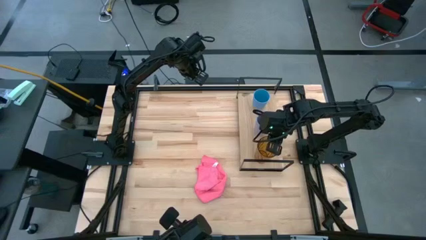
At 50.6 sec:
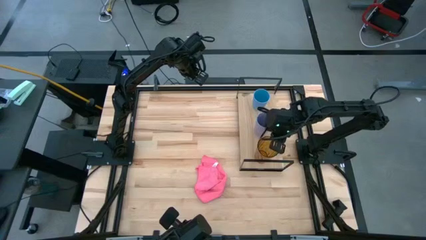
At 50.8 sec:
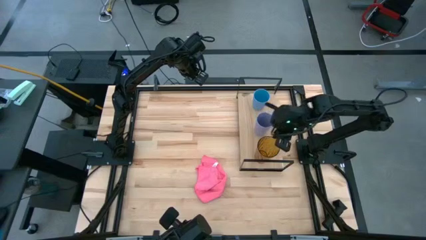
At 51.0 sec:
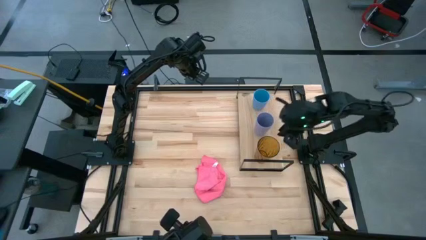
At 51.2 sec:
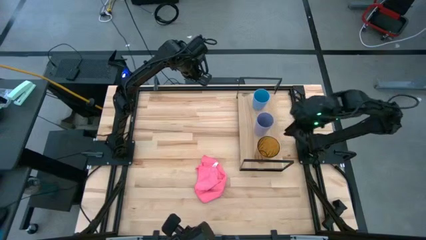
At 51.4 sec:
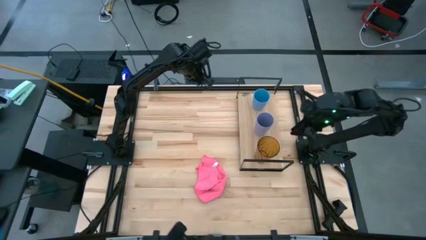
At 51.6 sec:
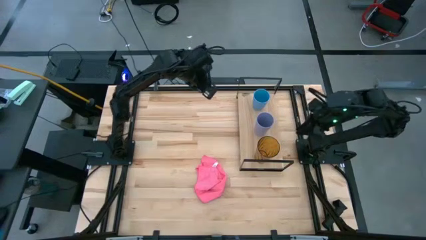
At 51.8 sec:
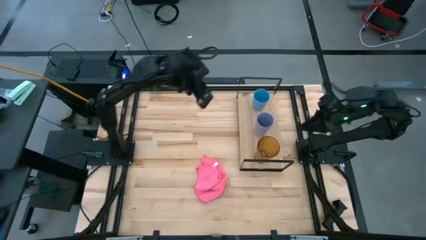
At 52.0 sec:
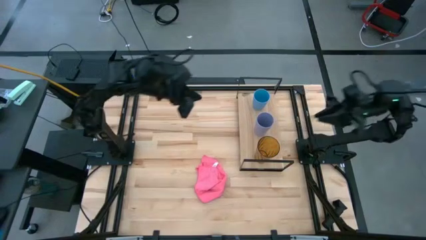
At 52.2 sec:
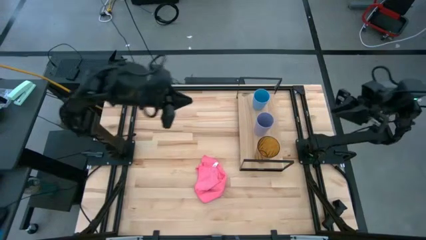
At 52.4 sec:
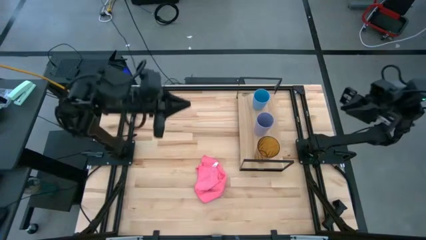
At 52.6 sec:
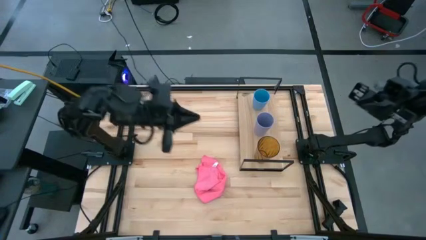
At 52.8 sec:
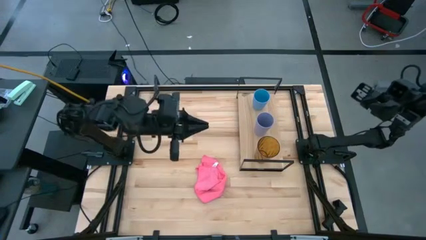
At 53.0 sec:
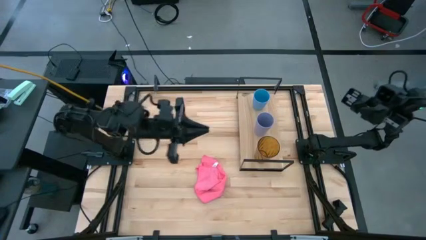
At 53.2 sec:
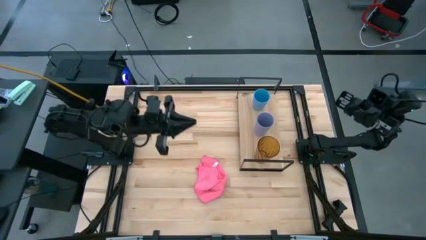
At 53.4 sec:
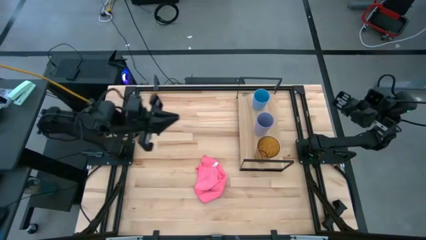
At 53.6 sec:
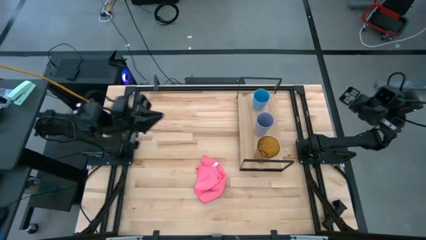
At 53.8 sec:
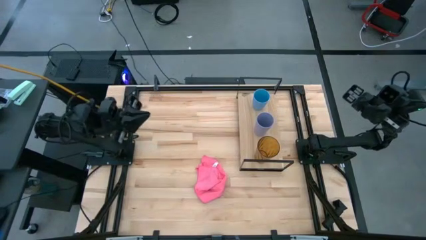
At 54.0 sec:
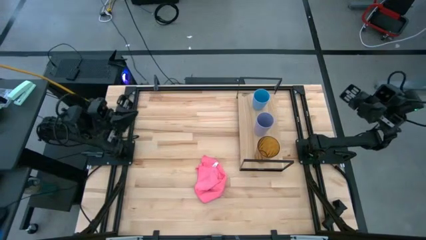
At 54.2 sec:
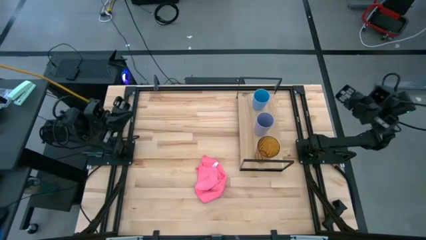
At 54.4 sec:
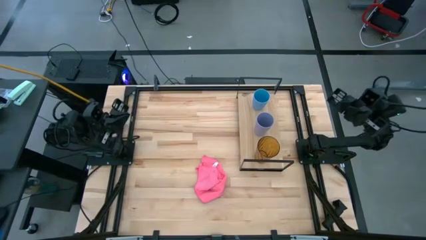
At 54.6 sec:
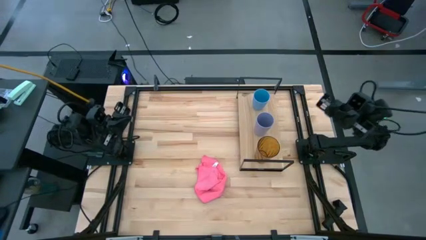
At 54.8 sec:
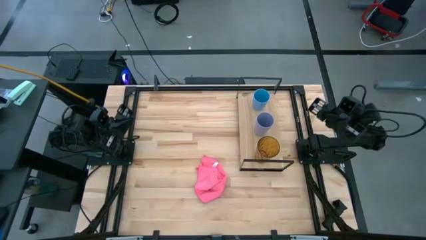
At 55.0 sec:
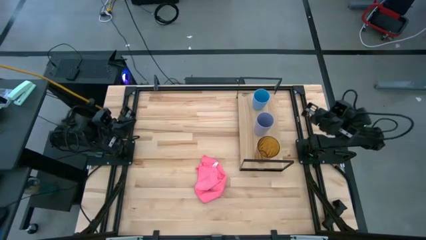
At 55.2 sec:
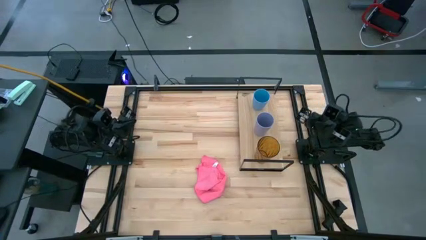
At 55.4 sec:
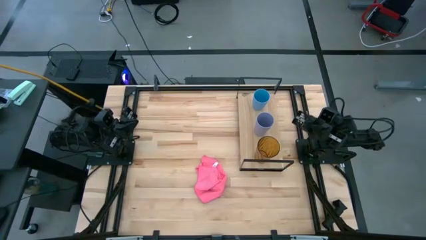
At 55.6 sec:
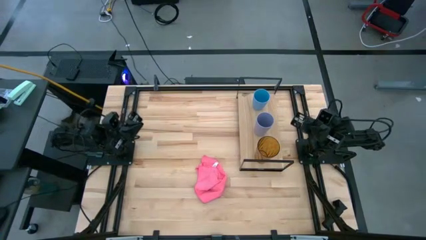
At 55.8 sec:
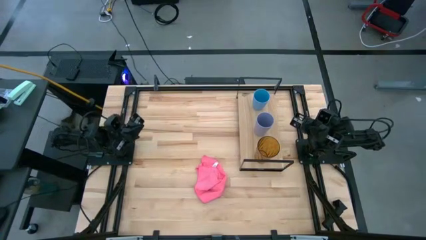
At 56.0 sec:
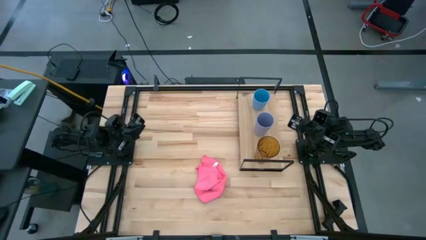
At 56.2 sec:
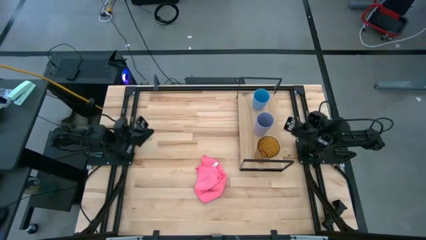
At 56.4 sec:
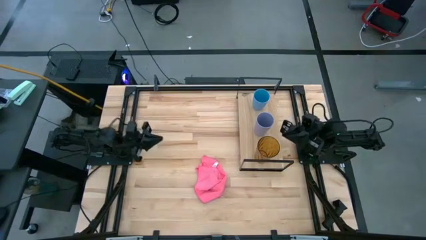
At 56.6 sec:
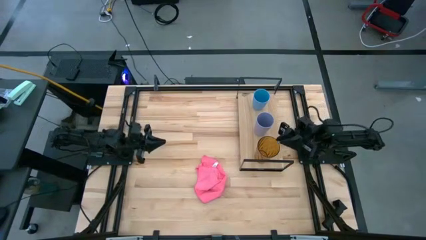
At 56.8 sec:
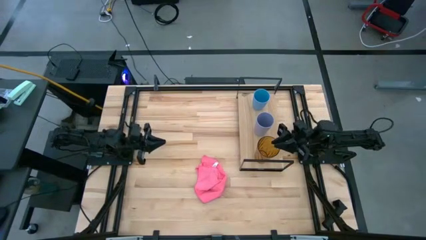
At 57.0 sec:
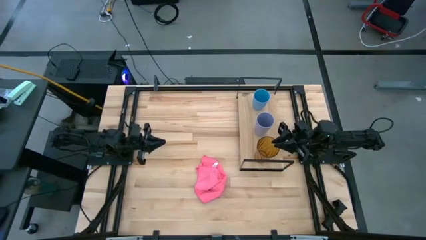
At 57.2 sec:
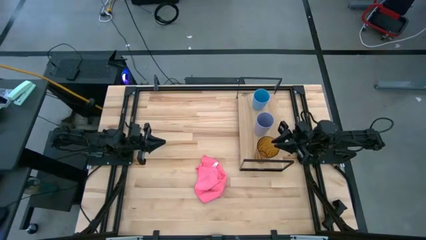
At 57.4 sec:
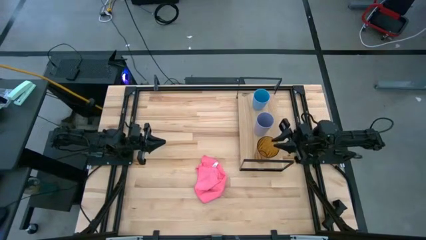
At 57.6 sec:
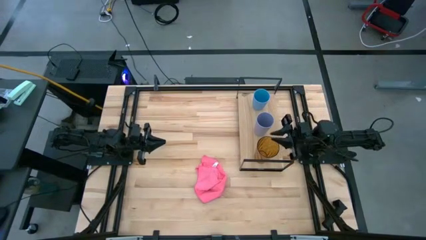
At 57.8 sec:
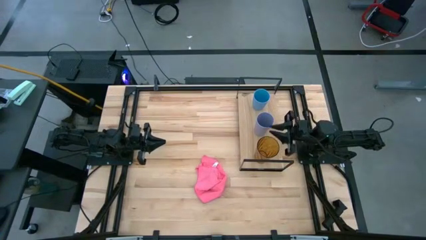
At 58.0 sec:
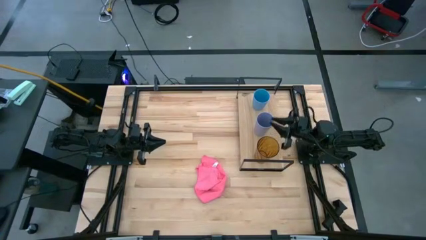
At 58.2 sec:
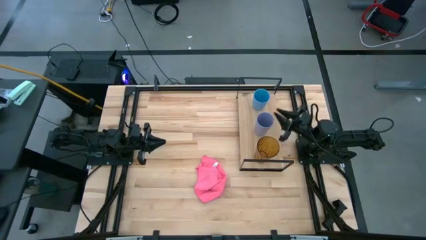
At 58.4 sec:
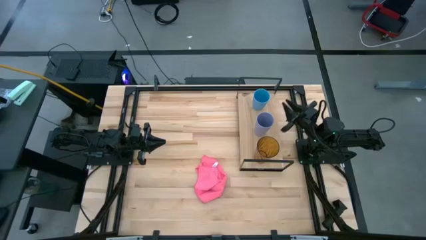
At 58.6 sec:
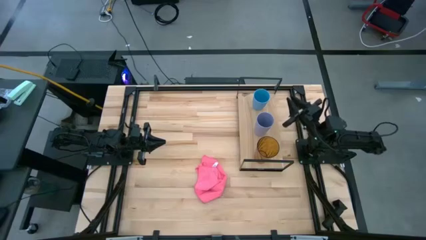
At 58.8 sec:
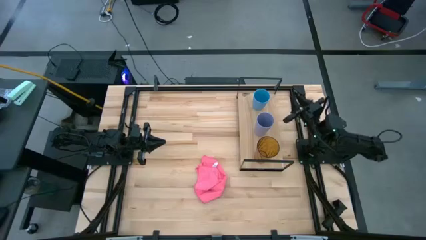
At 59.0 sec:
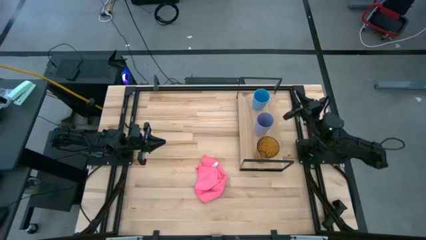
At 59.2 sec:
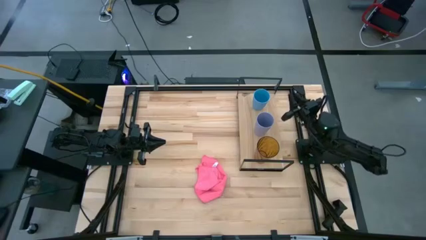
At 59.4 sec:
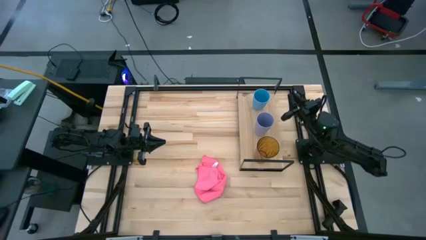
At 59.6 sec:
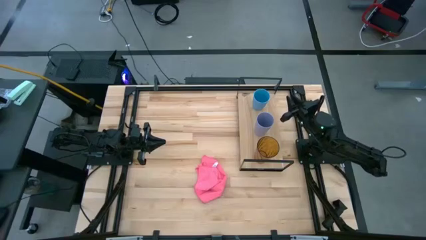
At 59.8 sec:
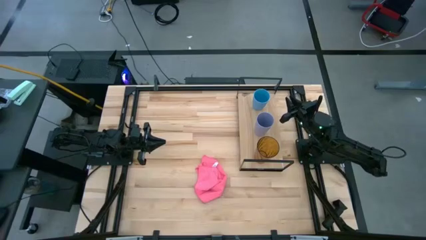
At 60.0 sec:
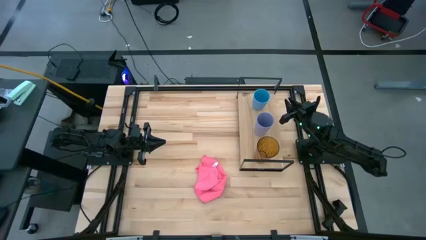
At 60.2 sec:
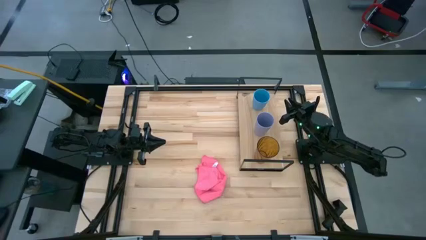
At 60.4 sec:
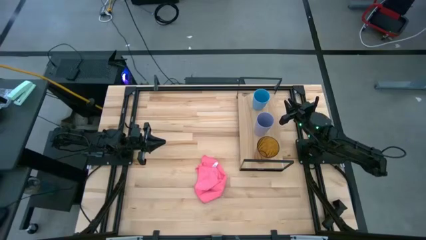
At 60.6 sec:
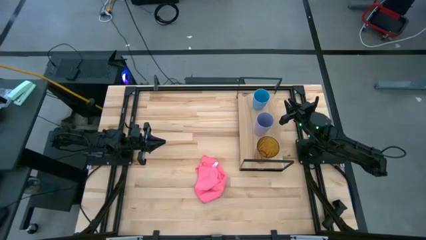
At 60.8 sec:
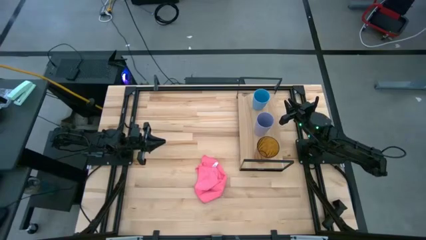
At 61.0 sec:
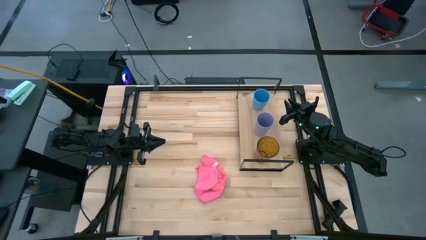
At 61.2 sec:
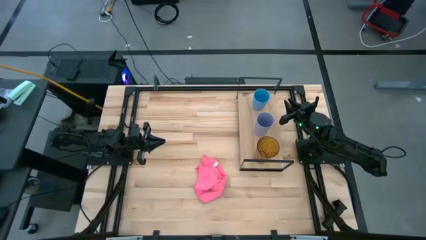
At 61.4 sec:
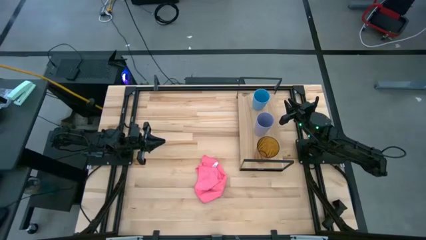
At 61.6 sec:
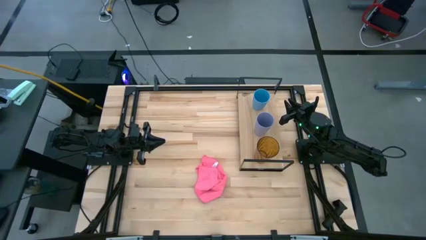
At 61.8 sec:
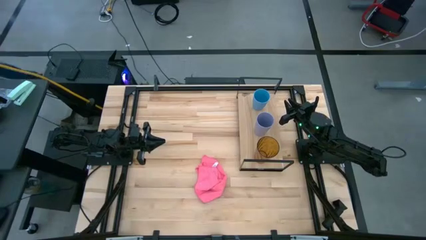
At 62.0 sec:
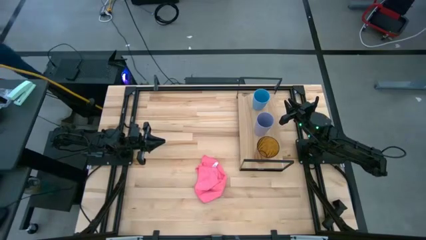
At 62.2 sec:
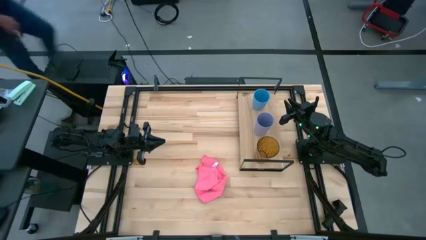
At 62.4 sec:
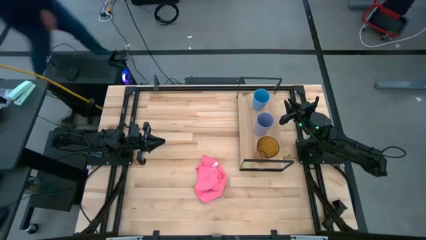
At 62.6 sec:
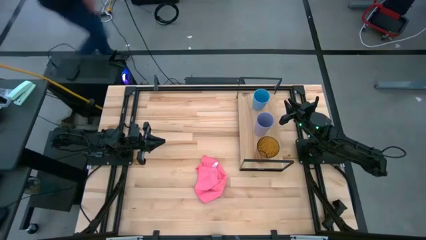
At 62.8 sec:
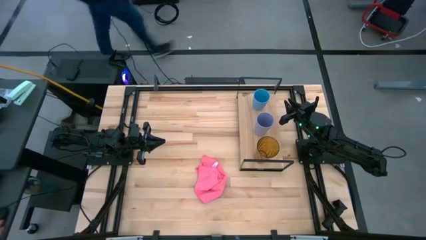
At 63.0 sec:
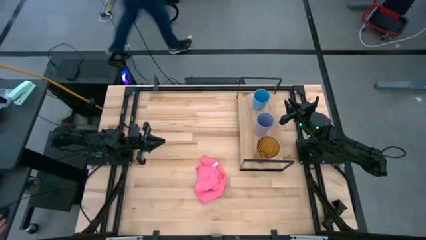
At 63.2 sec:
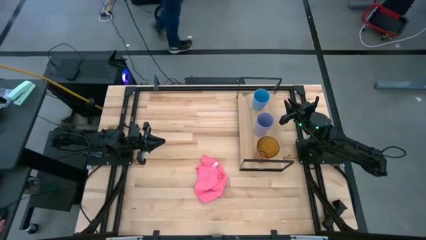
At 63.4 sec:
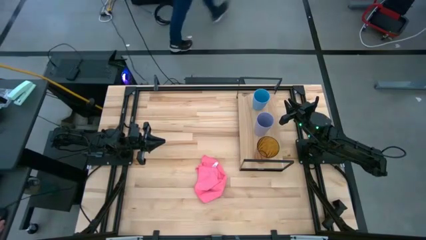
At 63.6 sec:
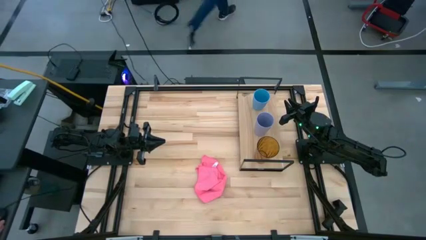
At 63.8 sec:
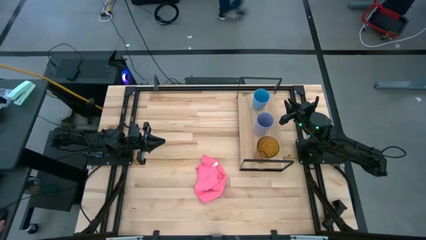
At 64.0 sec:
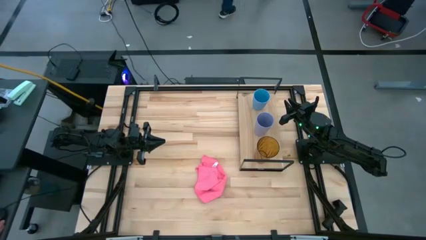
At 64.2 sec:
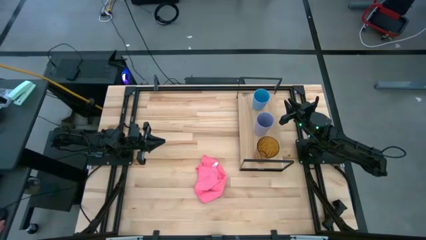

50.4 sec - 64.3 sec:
Task: Stack small to large cups/mugs on shelf
Return to Home Position
